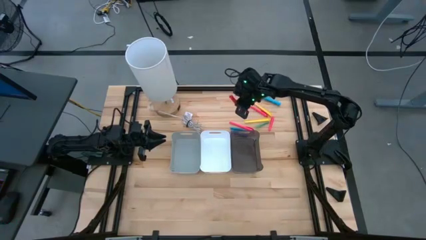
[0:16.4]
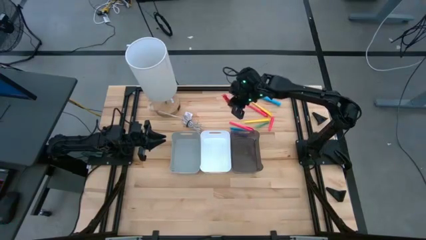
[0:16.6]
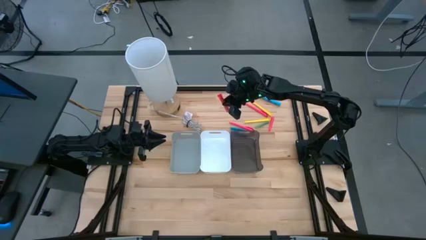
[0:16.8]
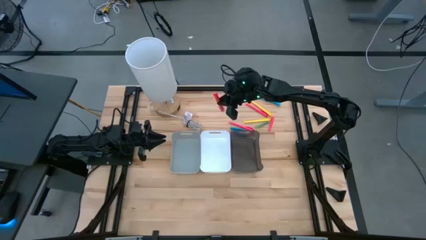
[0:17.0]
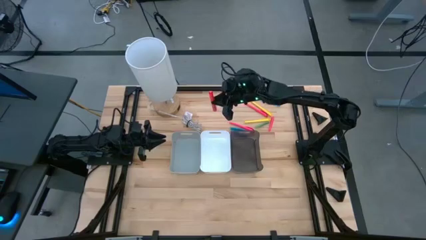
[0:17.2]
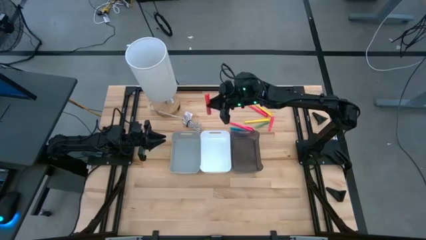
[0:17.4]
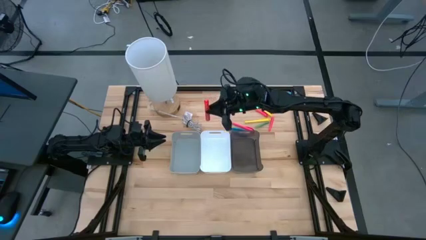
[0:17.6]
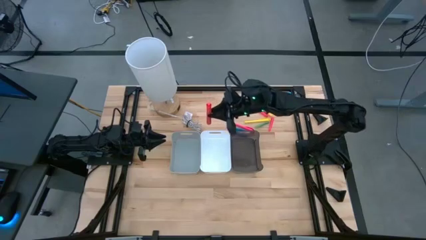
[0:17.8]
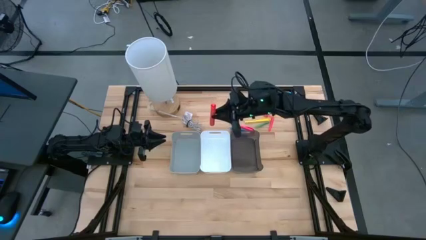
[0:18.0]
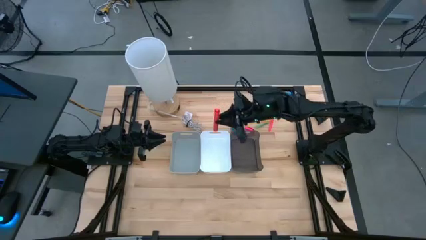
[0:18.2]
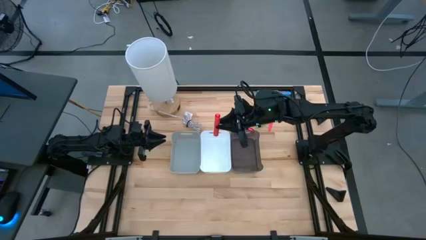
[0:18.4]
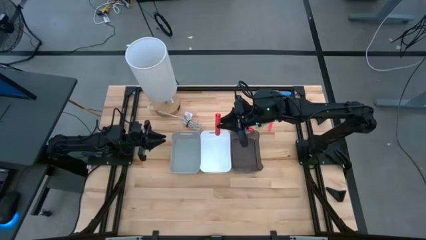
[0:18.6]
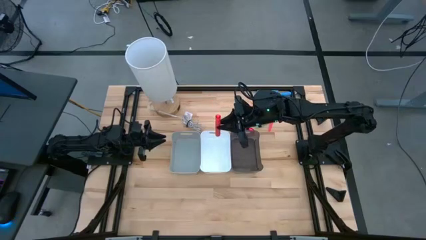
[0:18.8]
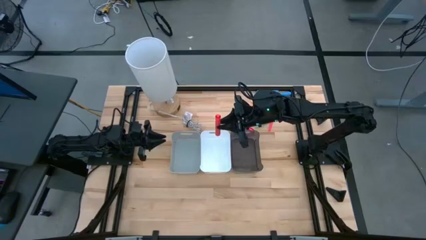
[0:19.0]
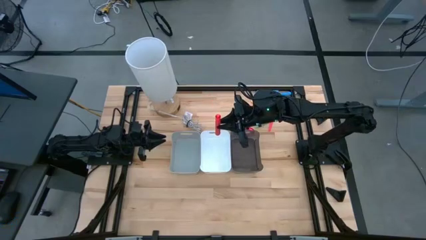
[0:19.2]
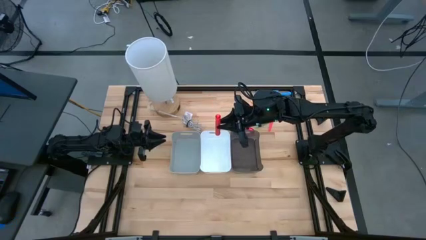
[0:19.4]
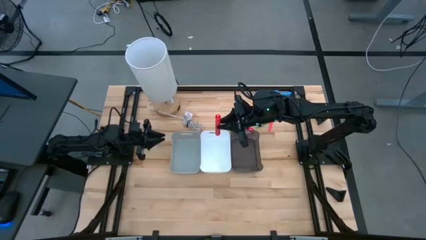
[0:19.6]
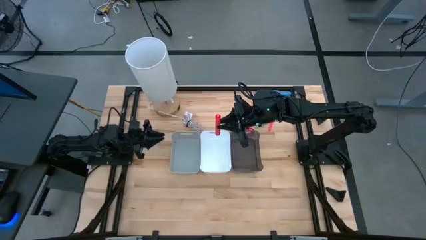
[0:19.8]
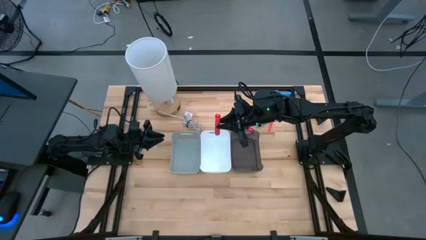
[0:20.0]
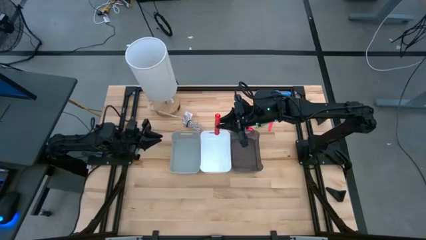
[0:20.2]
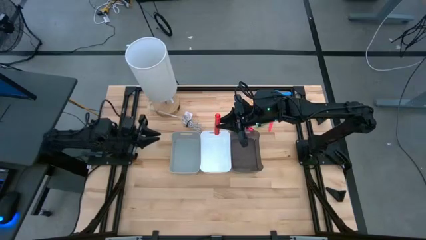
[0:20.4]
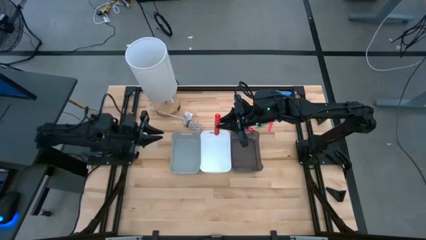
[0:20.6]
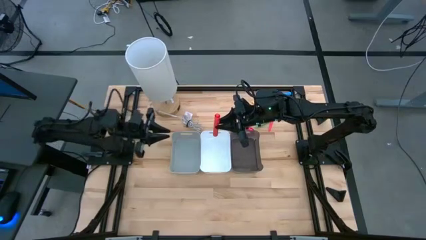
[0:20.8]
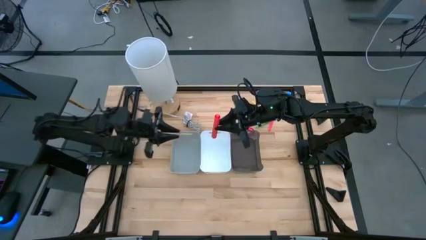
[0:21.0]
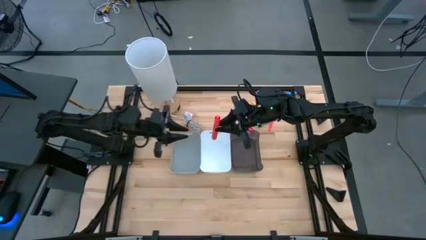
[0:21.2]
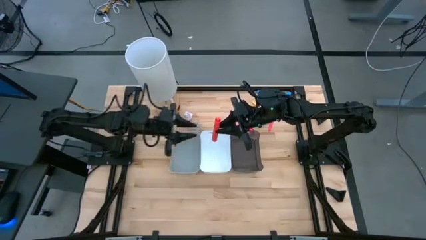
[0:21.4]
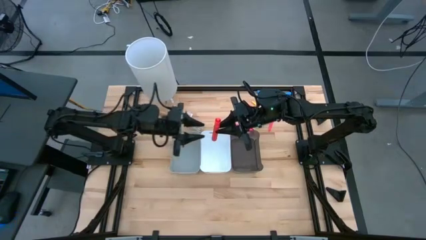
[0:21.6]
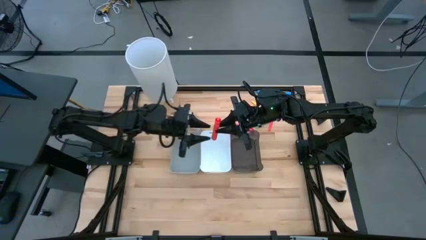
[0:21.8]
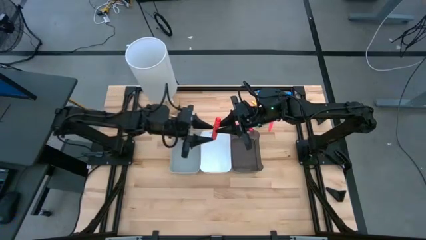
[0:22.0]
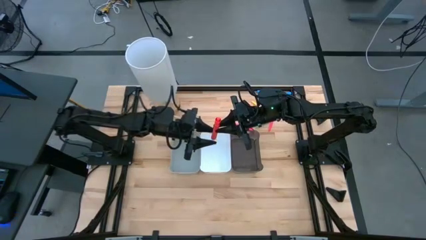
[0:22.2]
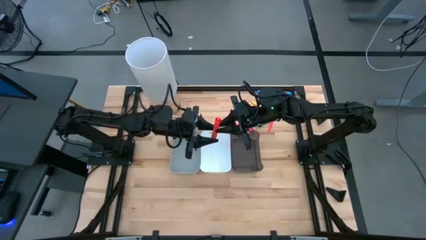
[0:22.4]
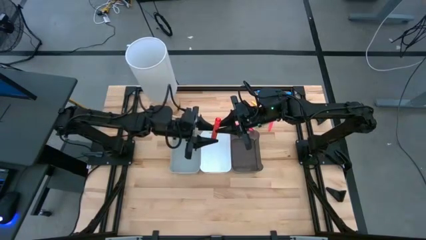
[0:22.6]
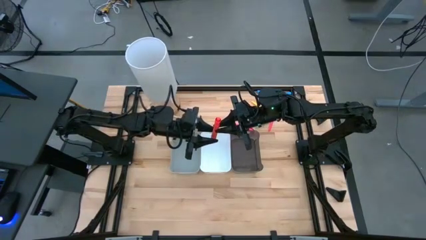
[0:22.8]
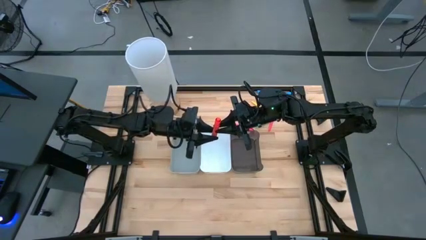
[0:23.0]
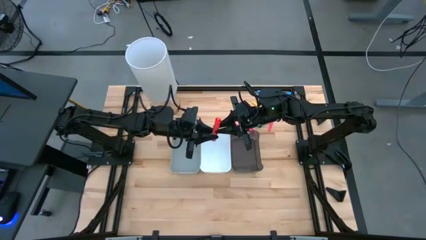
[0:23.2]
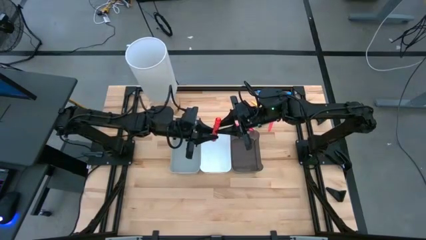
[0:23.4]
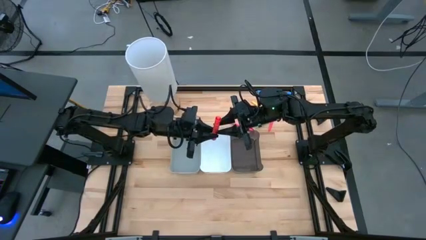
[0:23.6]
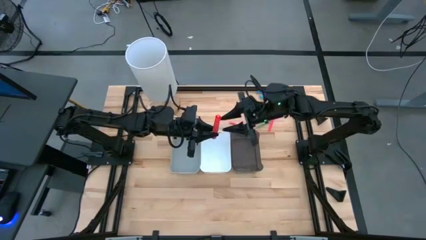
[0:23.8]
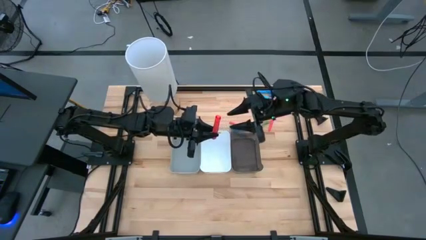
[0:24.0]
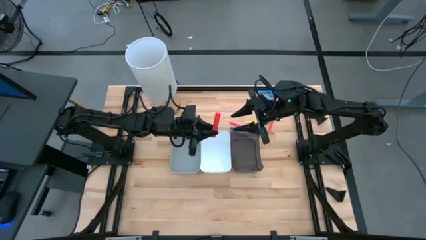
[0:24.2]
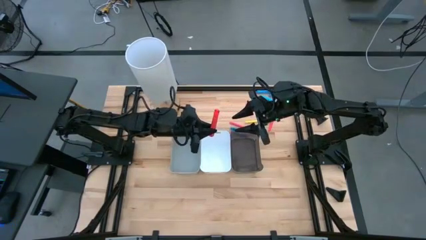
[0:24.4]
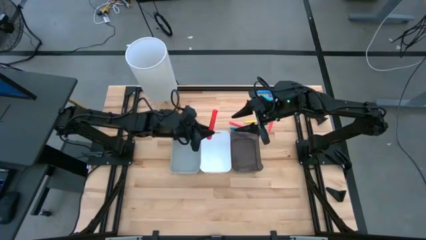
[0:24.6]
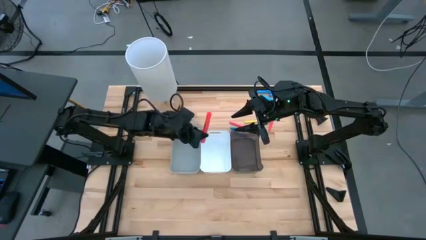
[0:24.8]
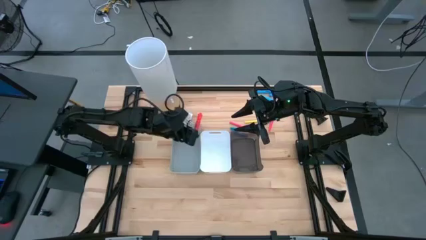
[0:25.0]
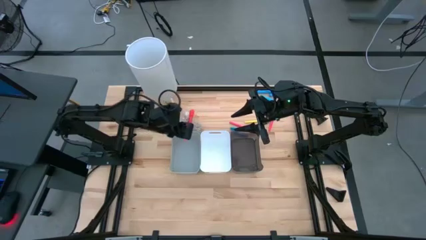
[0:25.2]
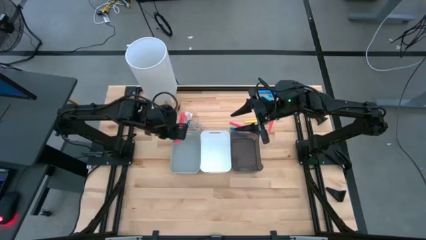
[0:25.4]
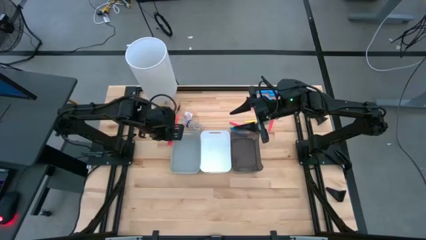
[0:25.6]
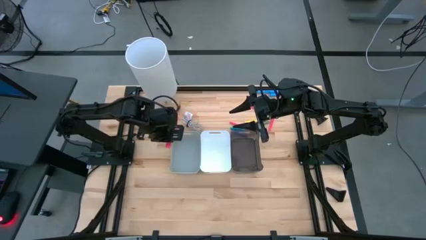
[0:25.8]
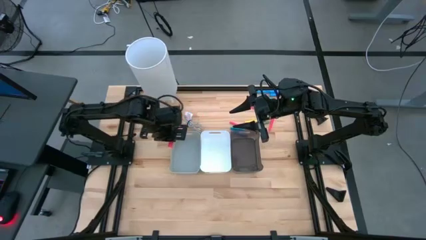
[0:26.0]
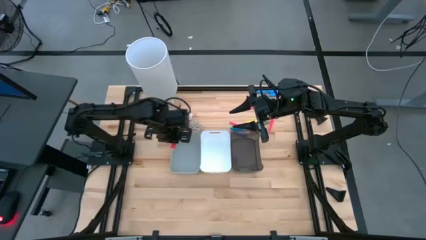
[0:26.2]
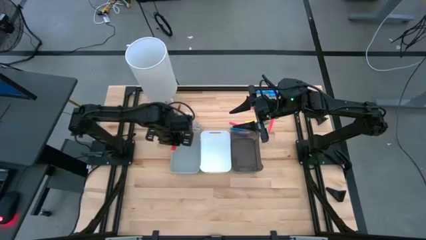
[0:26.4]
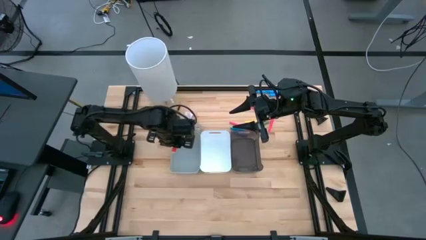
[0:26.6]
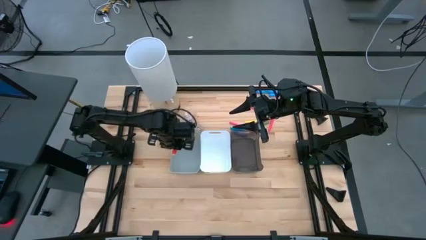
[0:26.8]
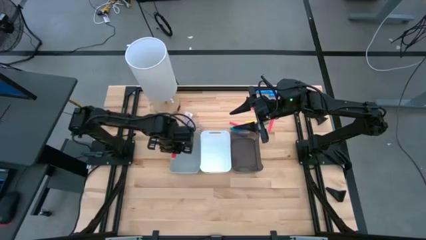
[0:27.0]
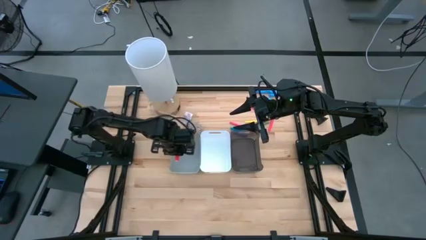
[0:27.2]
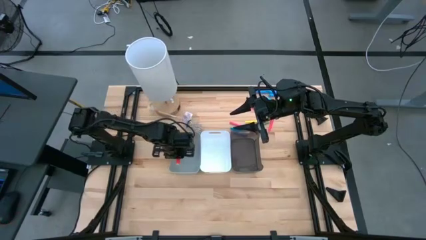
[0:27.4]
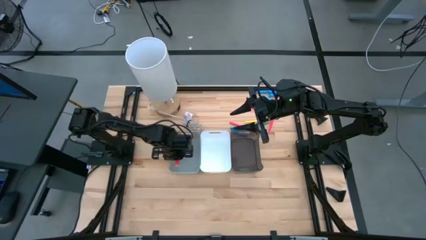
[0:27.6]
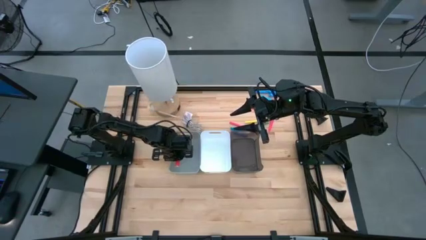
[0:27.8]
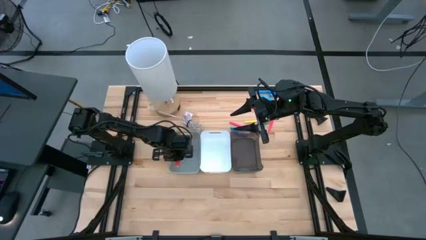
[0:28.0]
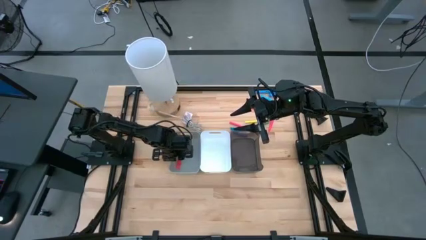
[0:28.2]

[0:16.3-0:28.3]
Task: Pick & Place Markers
Put the orange marker into the gray bin

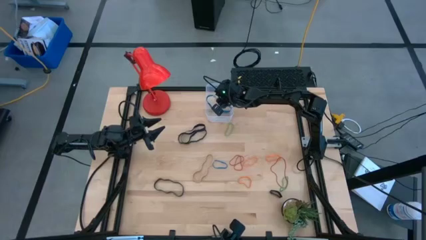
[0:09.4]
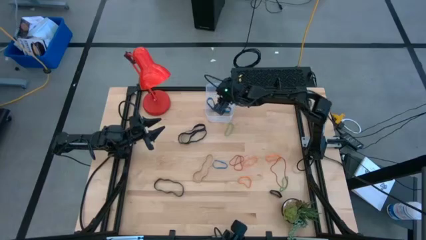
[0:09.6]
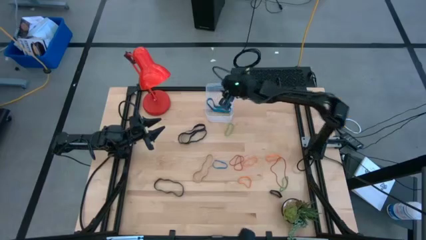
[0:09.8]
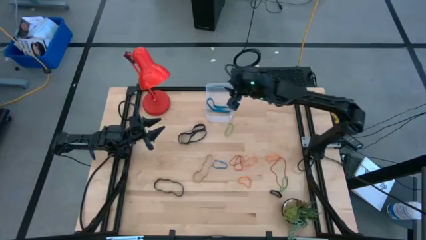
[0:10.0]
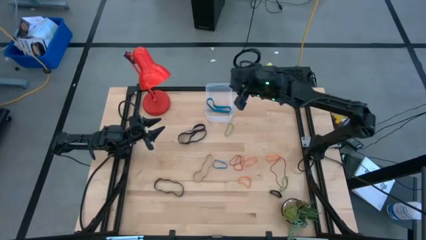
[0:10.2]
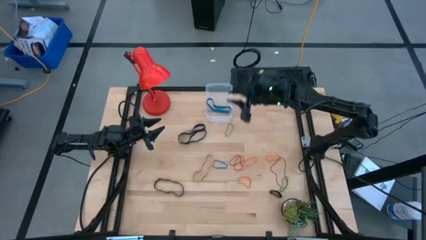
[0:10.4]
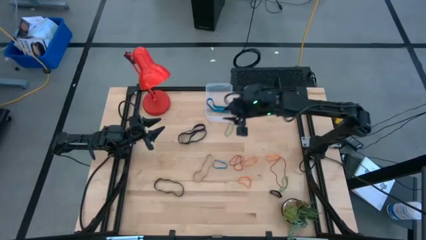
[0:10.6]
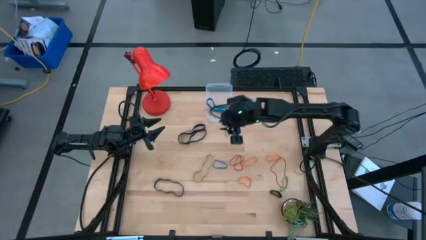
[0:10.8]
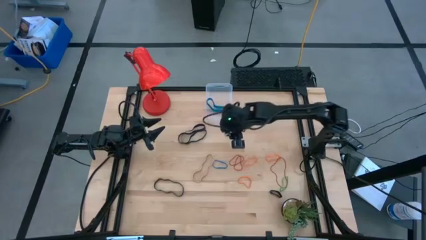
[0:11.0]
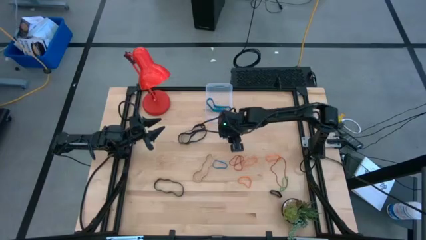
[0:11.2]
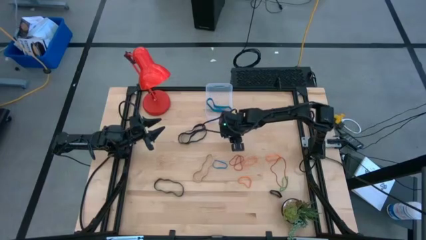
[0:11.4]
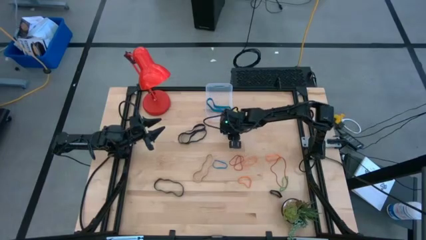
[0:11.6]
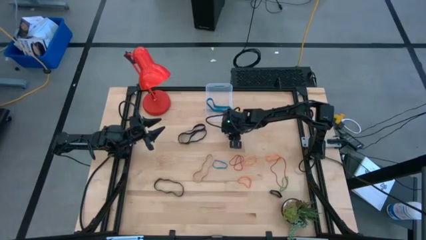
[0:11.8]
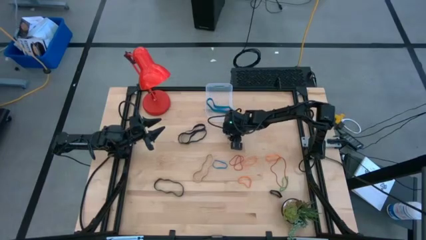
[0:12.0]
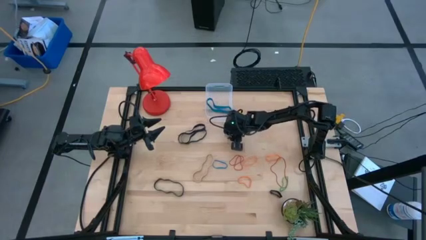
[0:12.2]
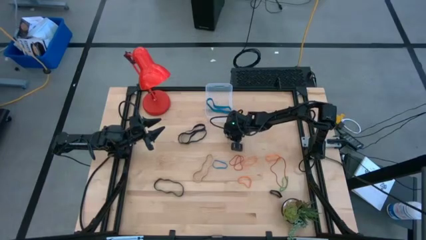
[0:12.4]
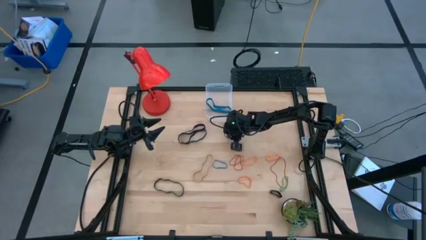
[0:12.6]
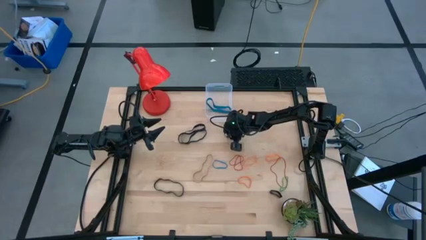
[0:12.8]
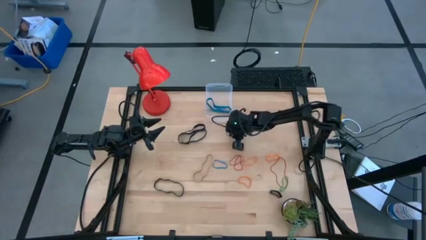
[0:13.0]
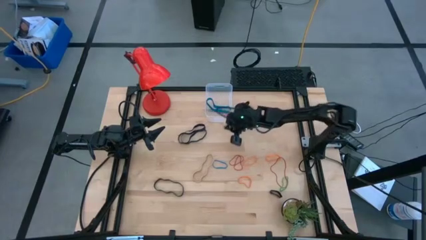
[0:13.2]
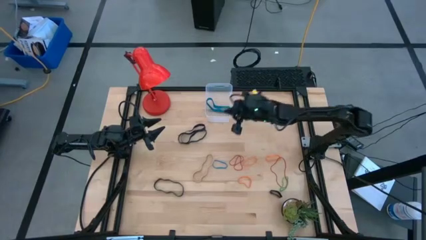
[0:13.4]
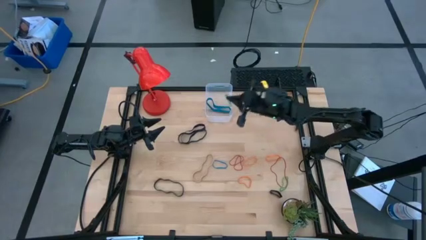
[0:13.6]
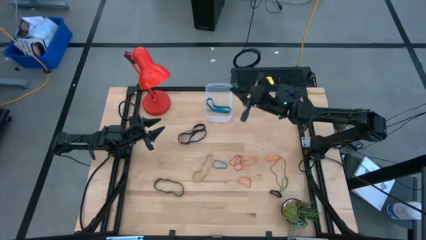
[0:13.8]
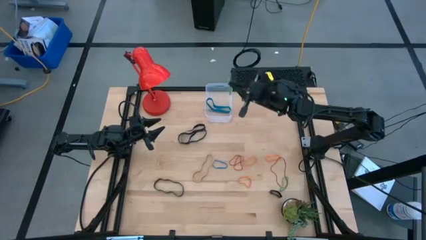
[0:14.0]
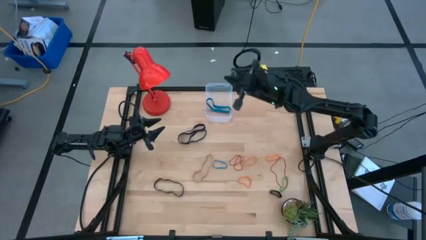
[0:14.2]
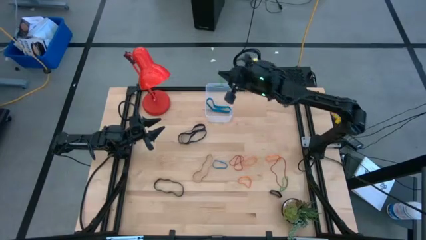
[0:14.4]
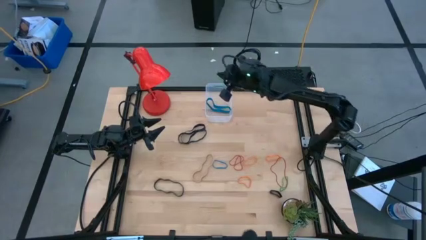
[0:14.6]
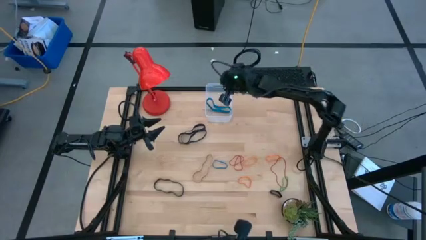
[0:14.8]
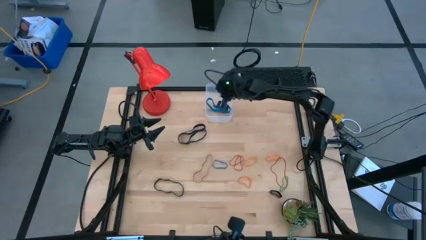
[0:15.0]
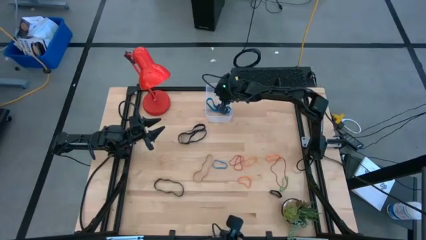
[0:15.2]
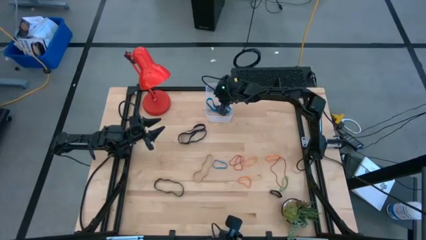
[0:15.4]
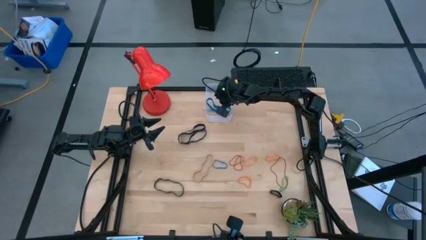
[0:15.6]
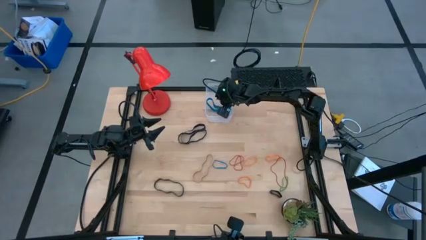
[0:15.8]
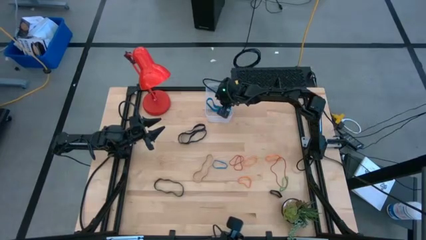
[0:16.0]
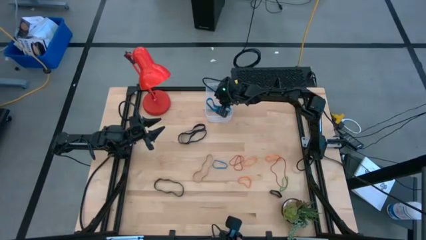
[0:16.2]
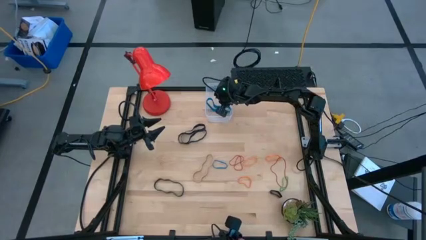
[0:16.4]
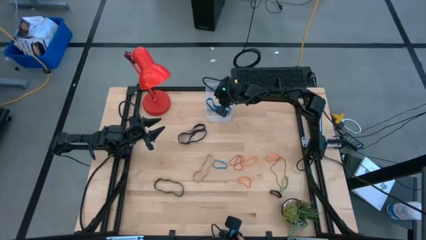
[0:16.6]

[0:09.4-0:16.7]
Task: Pick and place rubber bands into bin
Put the green rubber band into the transparent bin
